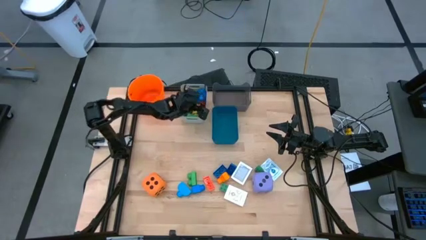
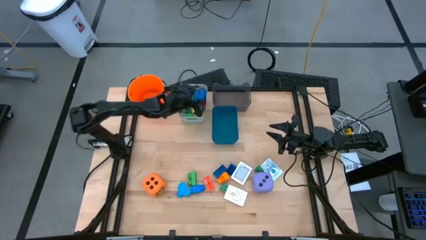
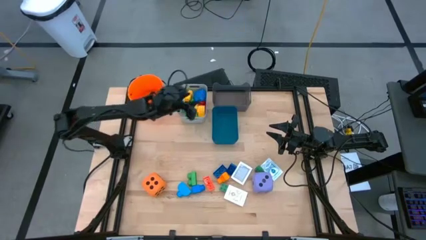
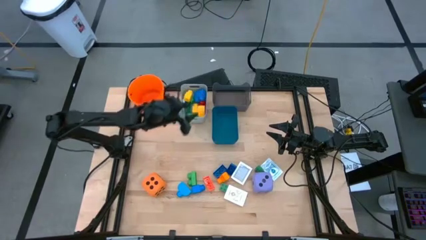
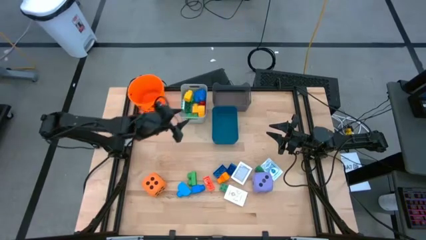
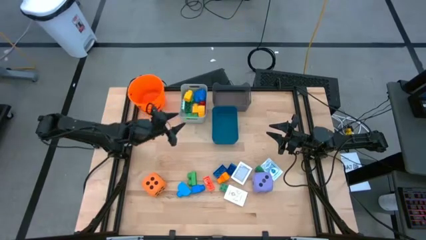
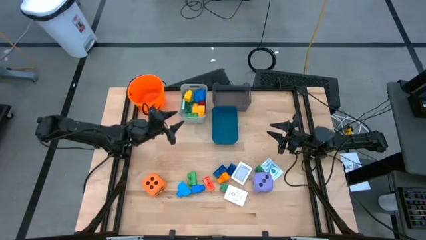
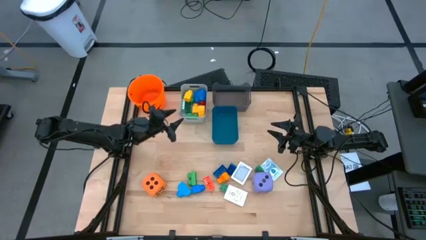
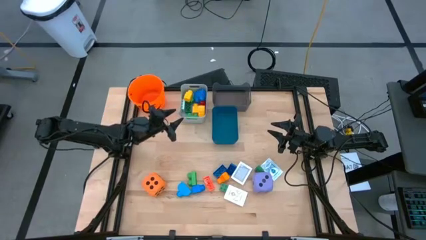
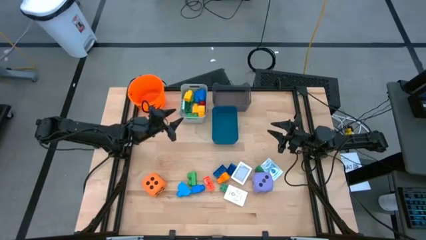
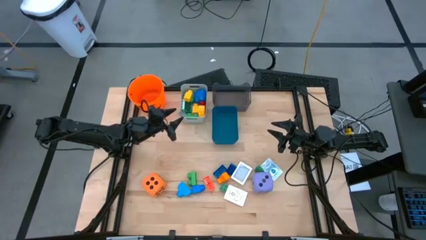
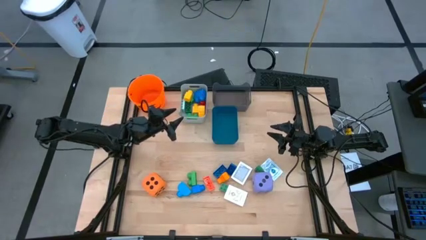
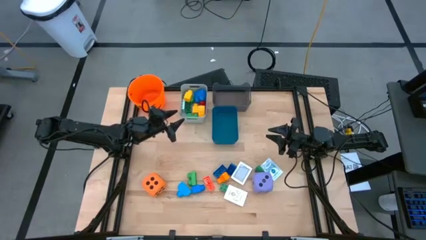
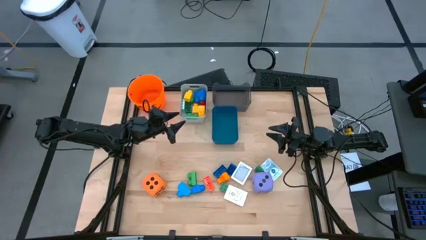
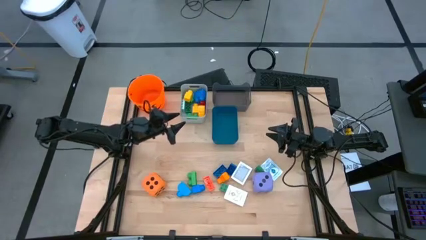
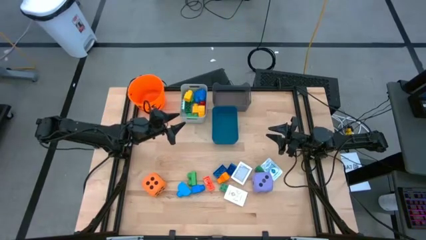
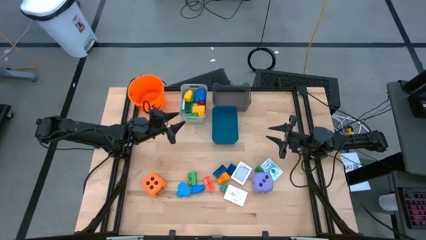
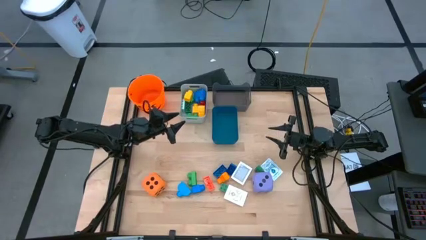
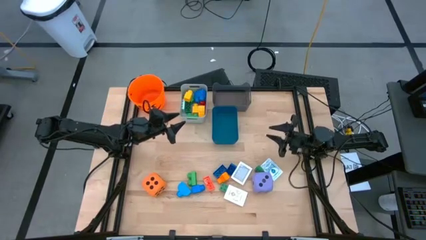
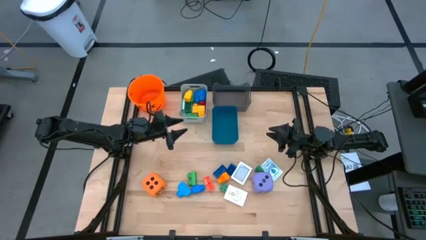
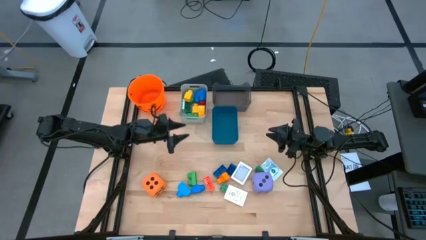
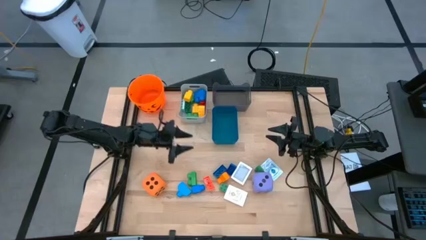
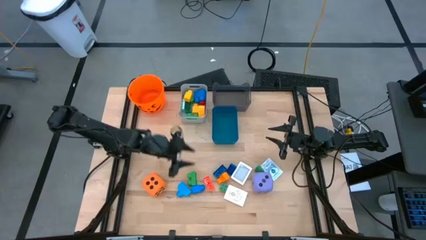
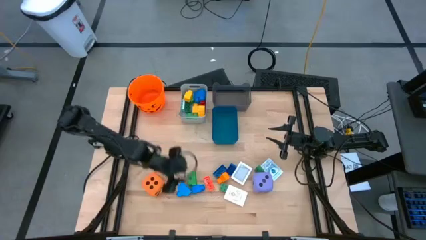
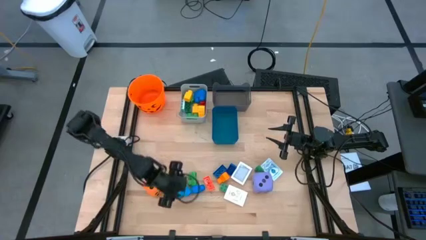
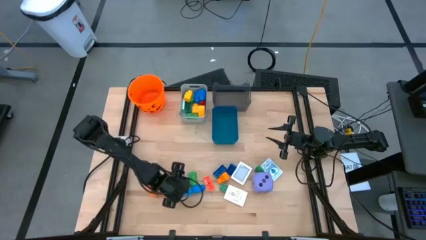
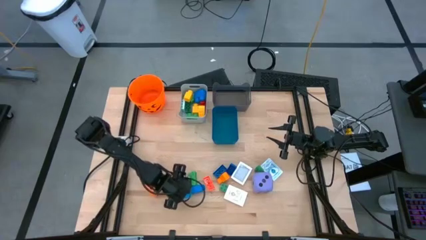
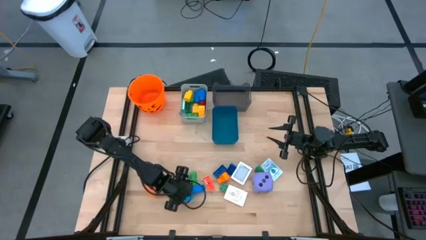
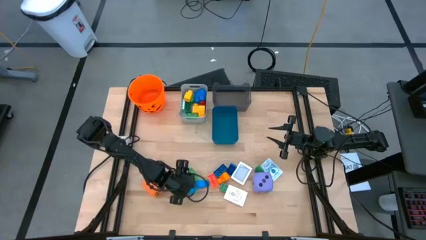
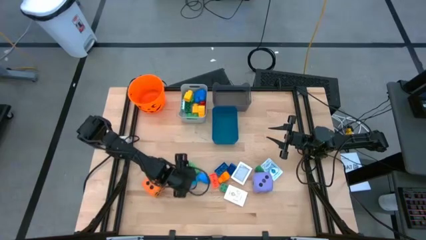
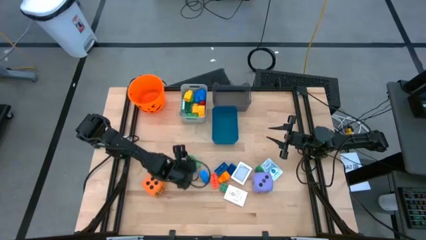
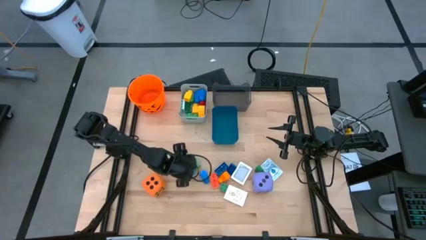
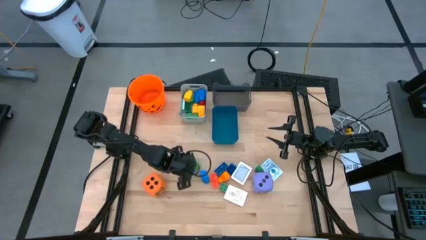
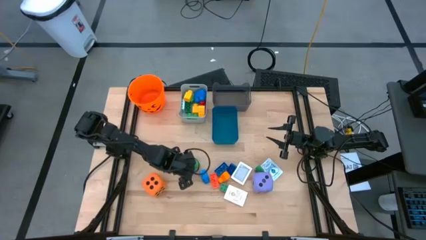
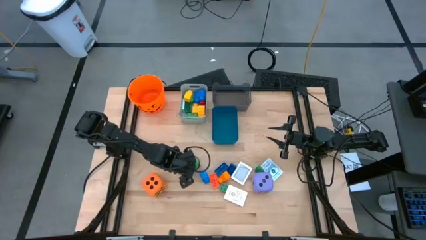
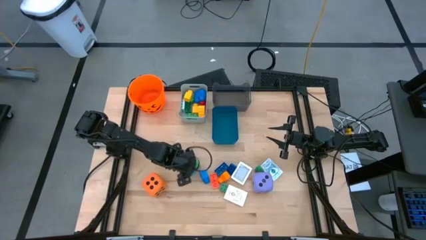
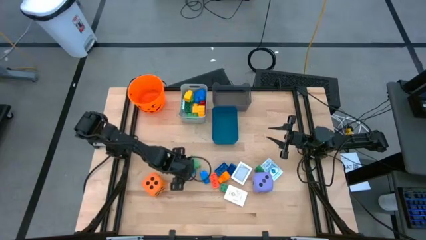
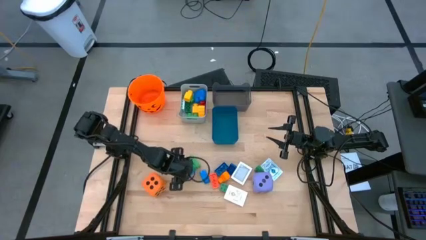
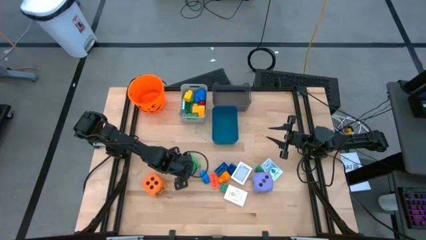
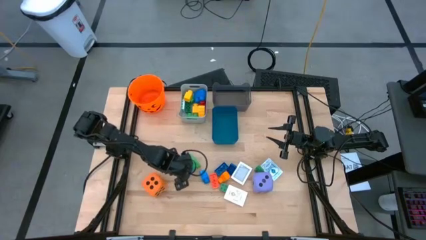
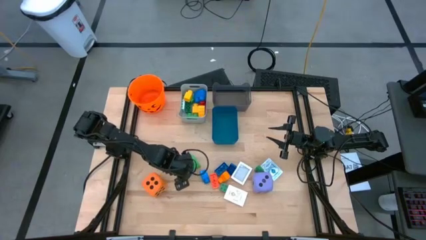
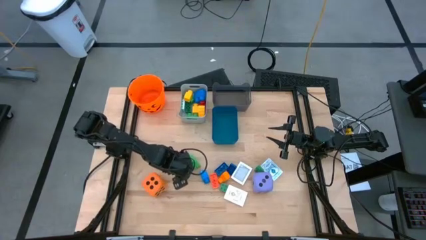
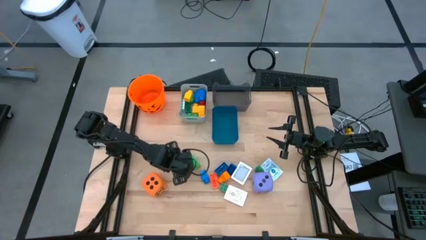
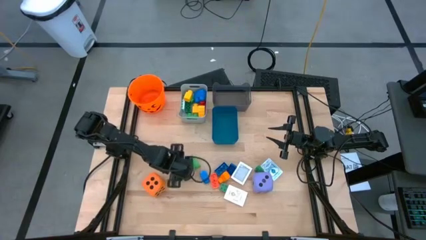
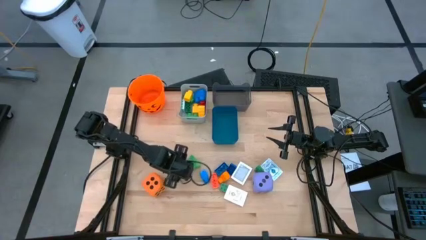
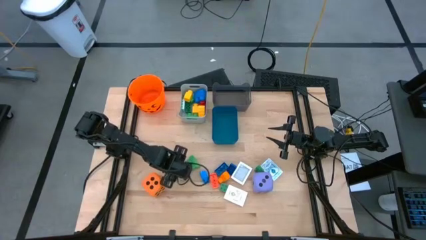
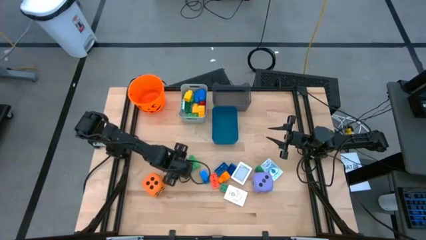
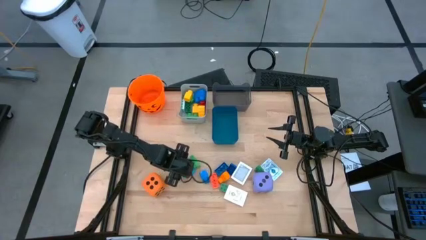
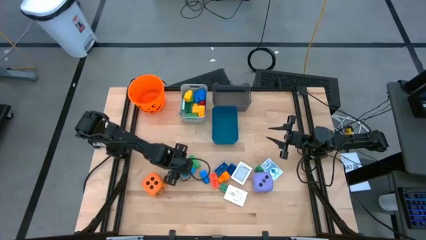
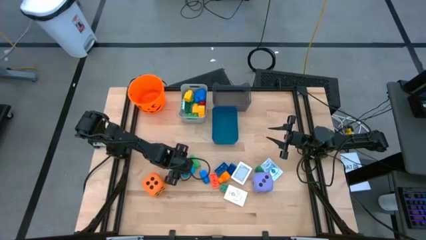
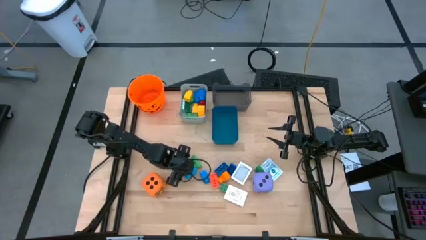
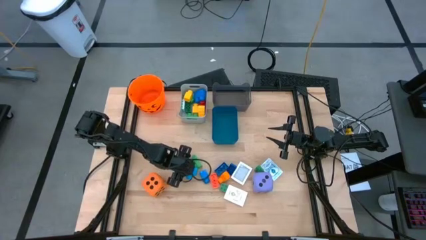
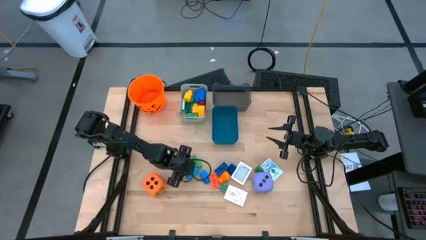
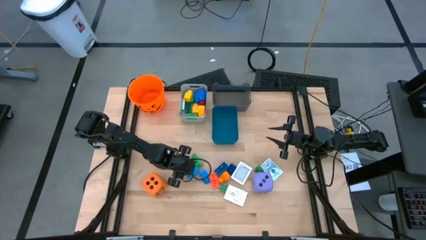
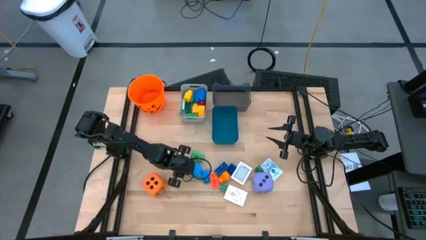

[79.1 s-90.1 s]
Task: Pick & Place Toys
Put the blue 1 stud gamepiece into the white bin

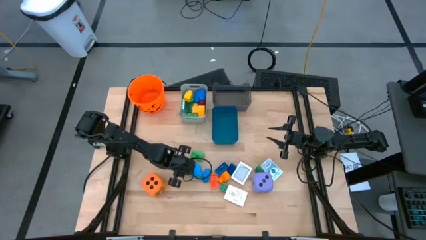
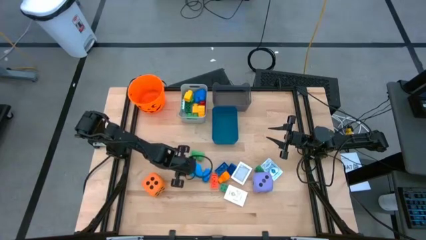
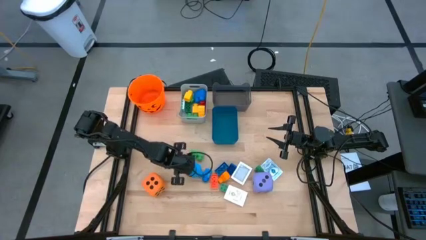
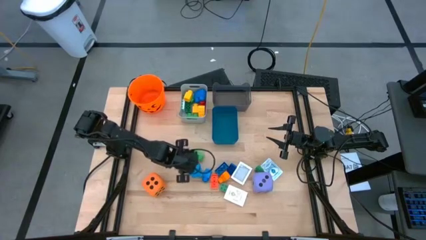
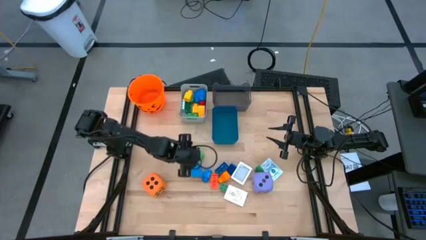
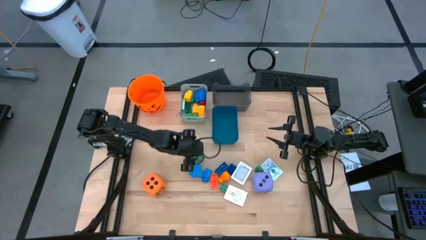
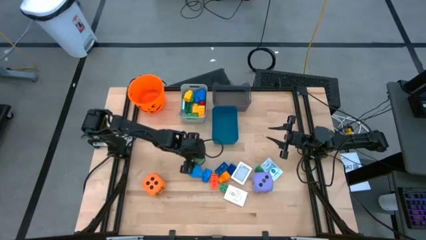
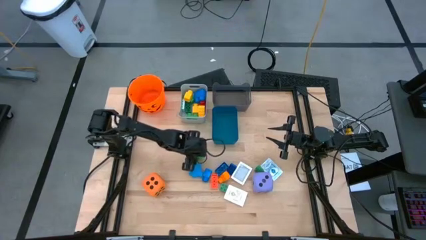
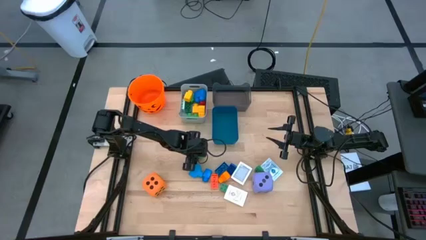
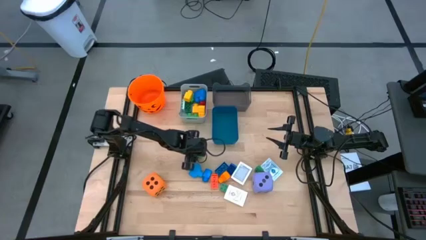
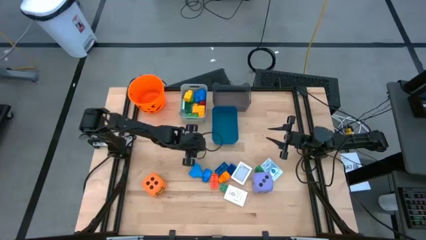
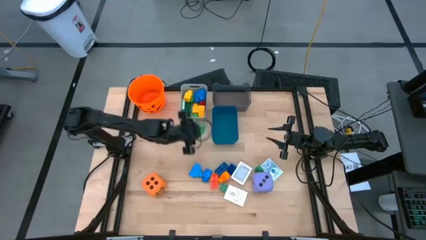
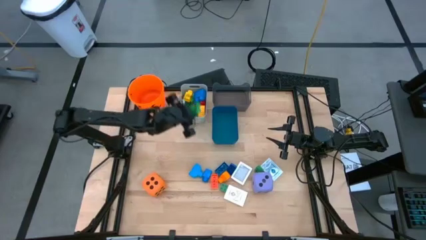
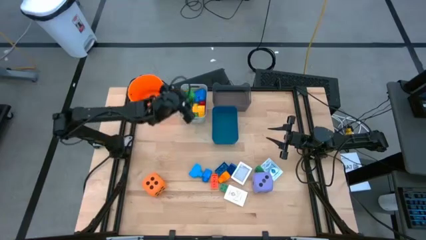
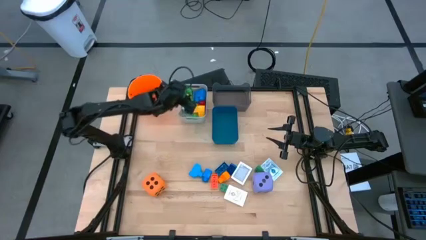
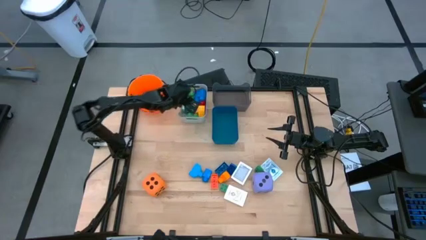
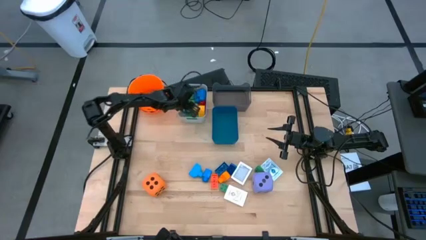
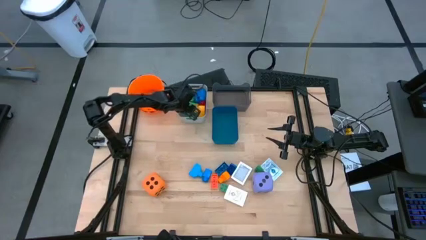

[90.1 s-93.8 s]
Put the green 2 stud gamepiece into the white bin

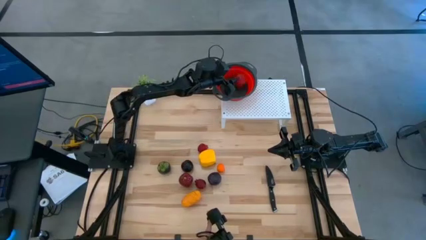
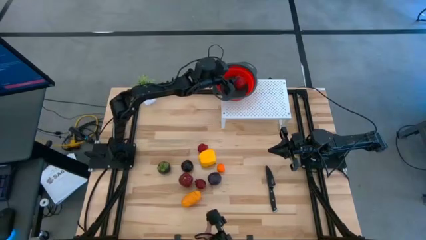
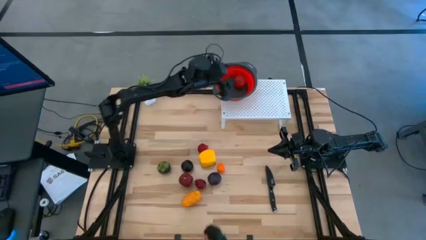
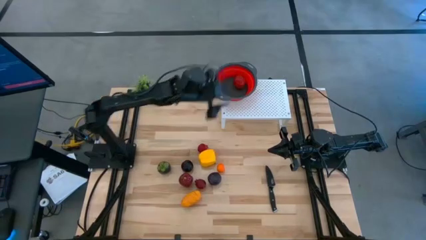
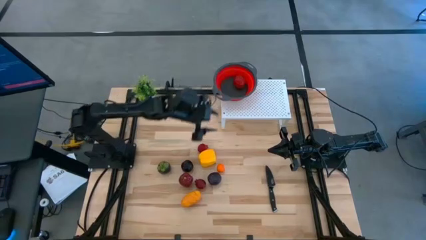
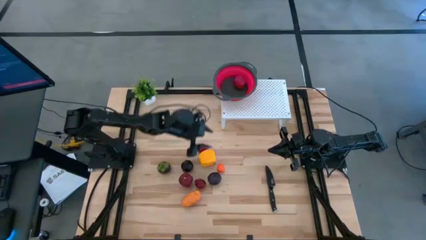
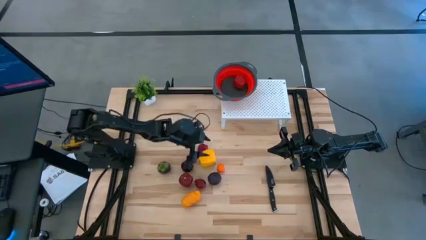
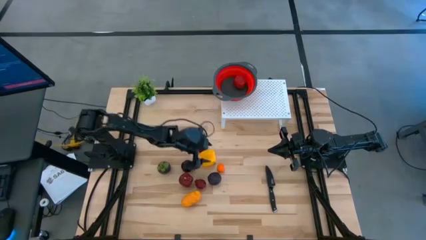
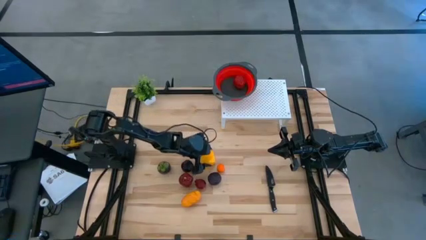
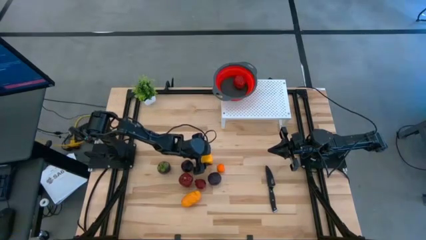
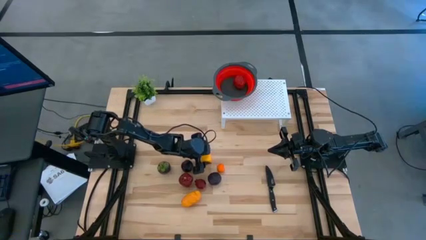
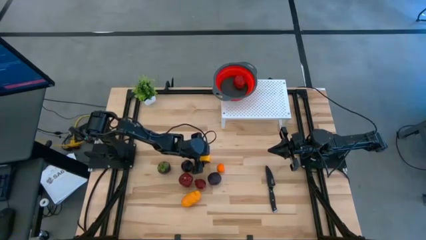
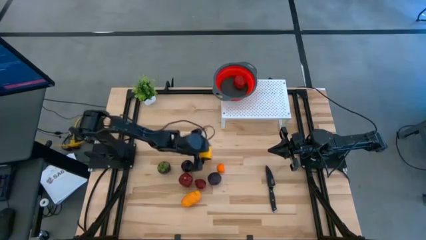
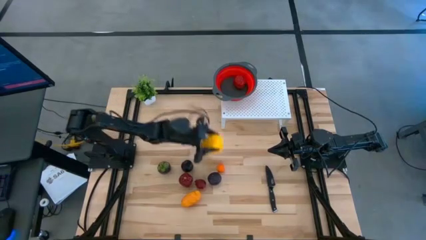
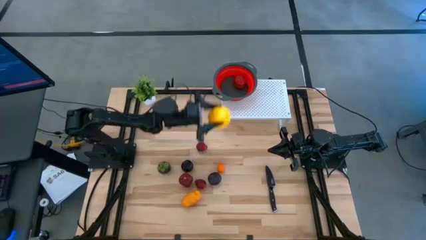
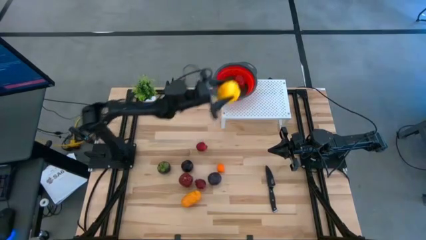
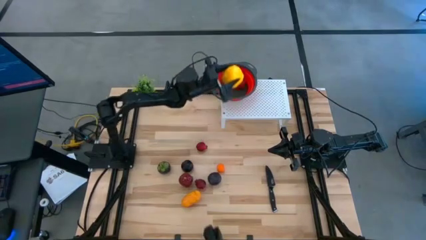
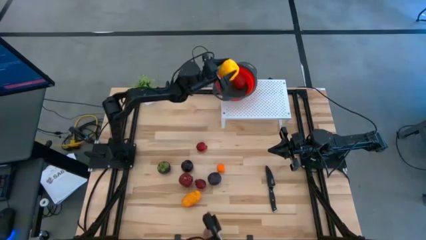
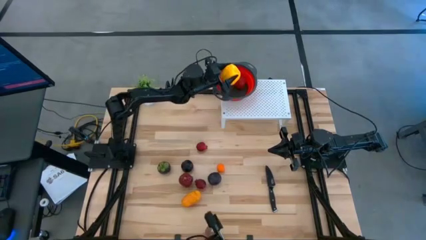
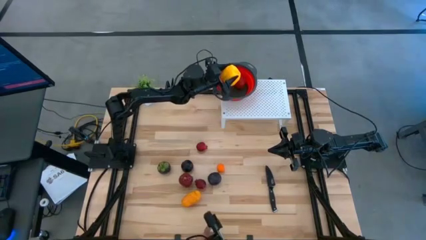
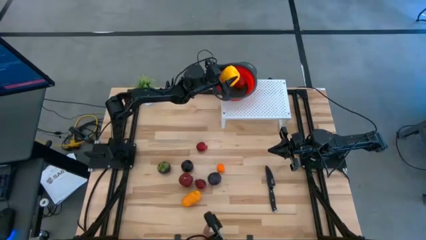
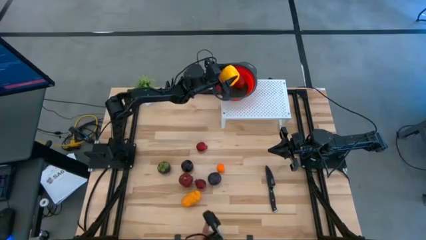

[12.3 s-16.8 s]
Task: Pick & Place Fruit
Put the lemon into the red strainer bowl
